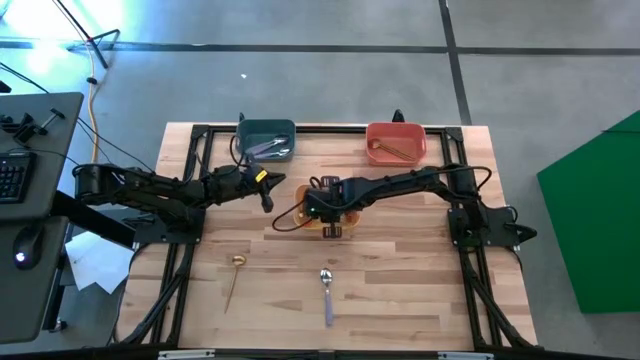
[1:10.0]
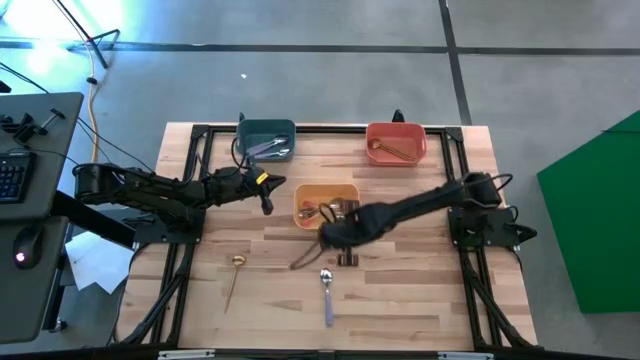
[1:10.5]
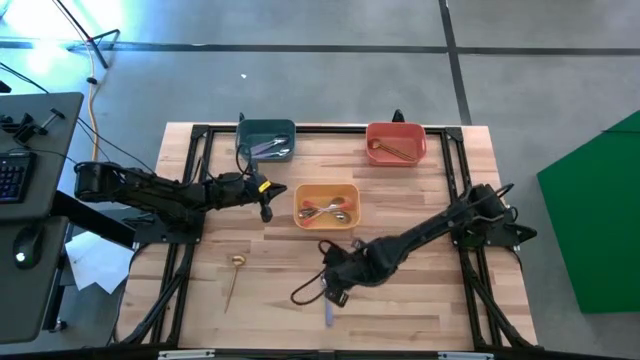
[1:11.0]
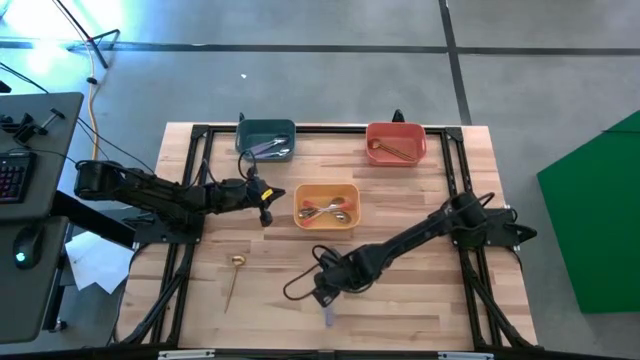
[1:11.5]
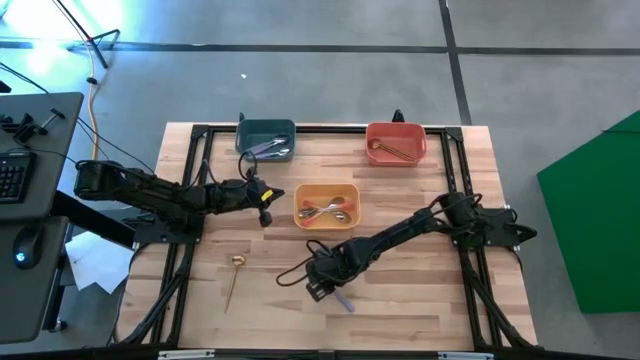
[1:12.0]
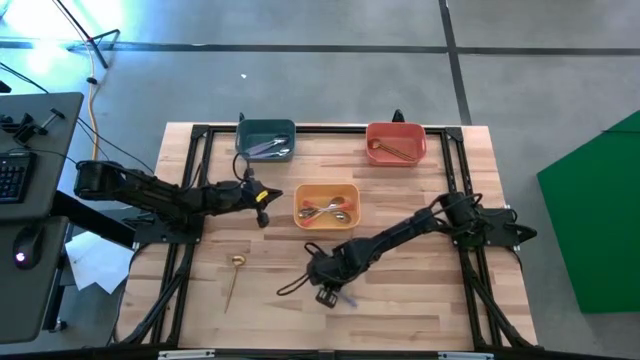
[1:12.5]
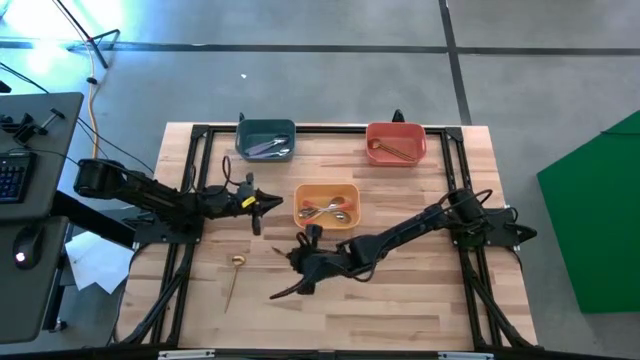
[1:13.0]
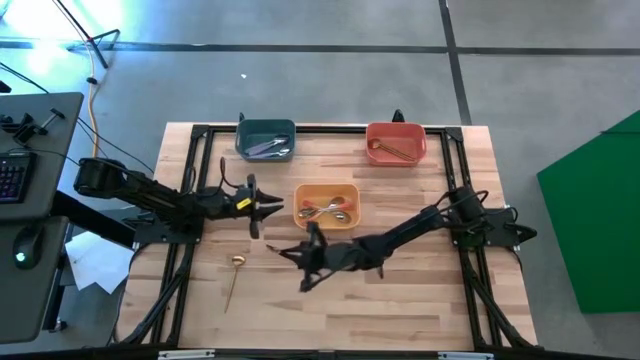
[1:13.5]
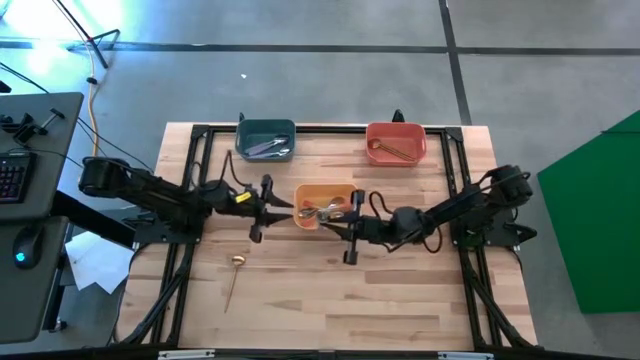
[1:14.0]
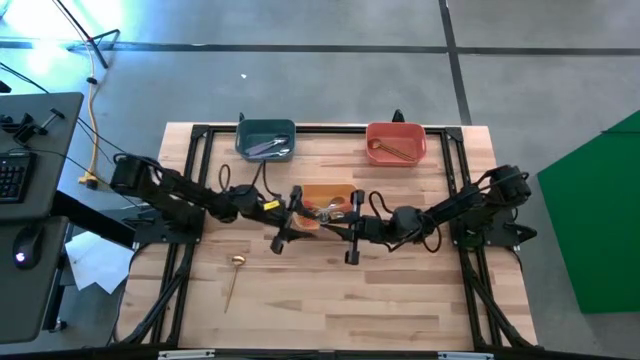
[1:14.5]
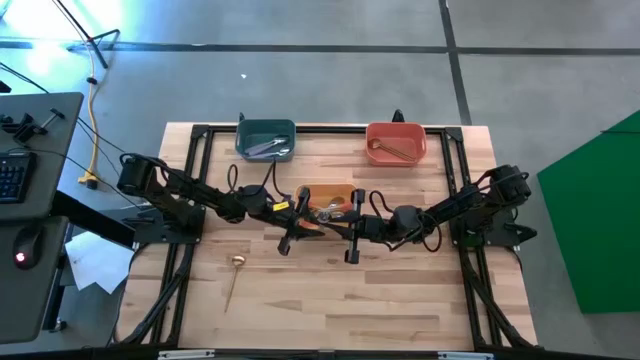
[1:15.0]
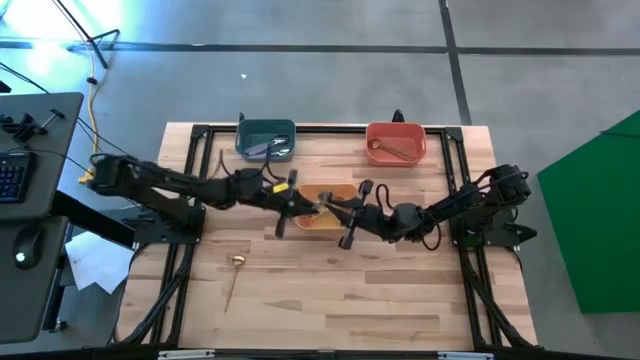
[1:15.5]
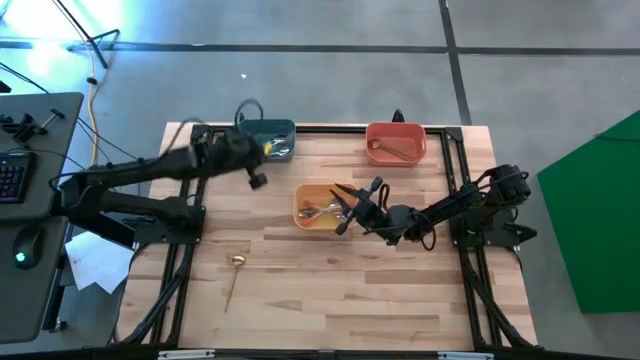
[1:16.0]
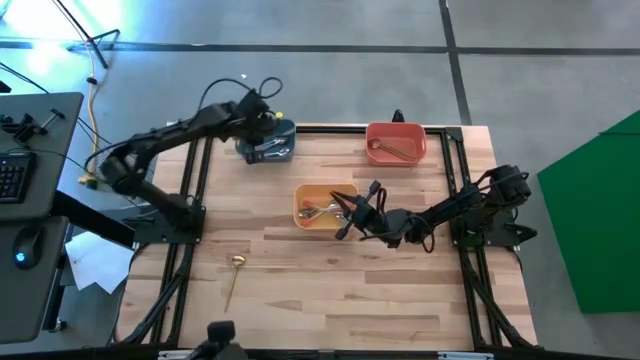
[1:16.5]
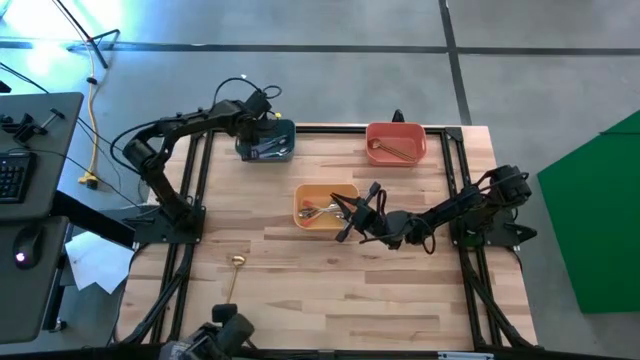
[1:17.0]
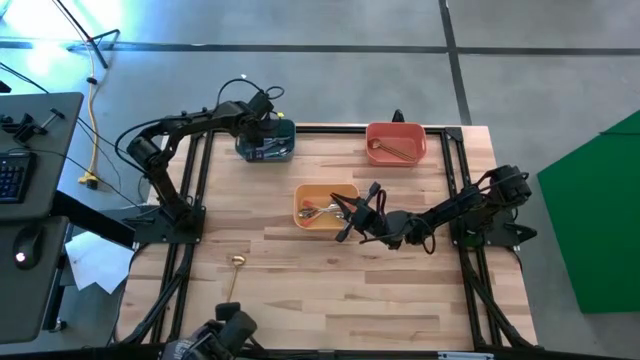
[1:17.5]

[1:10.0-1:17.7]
Task: Sort silverware by color (type)
Put the purple spoon into the blue bin

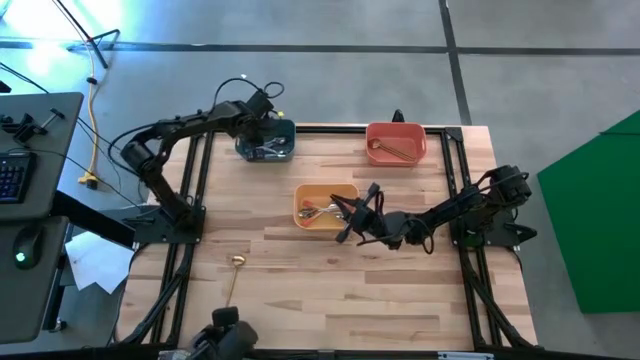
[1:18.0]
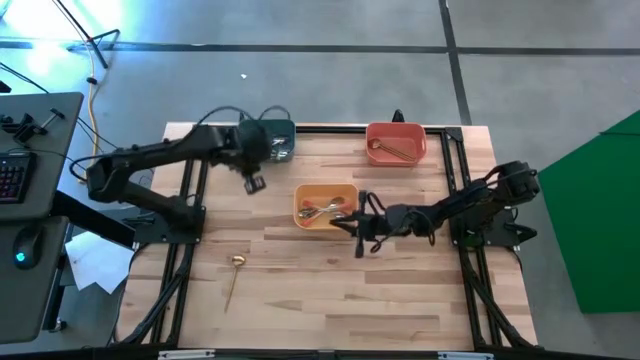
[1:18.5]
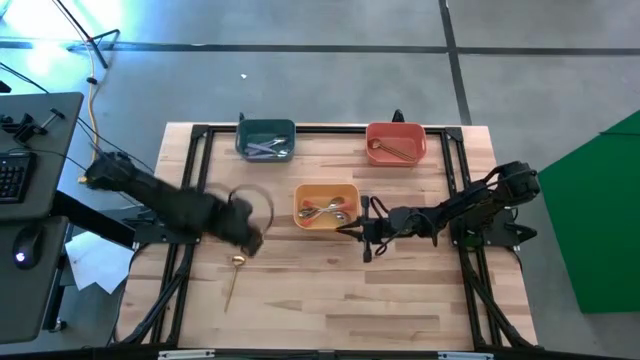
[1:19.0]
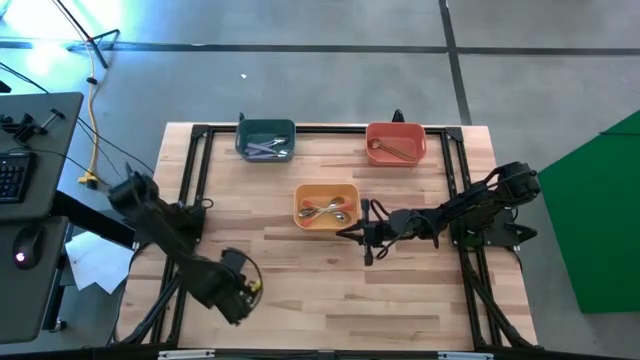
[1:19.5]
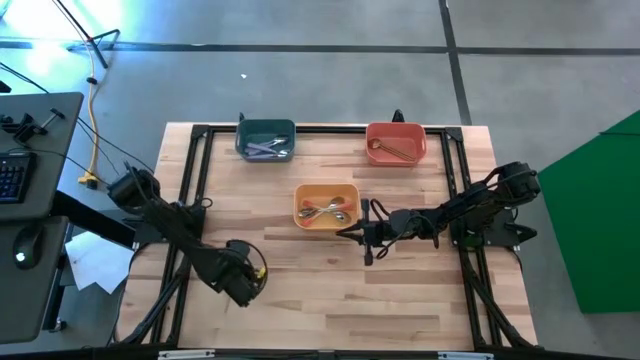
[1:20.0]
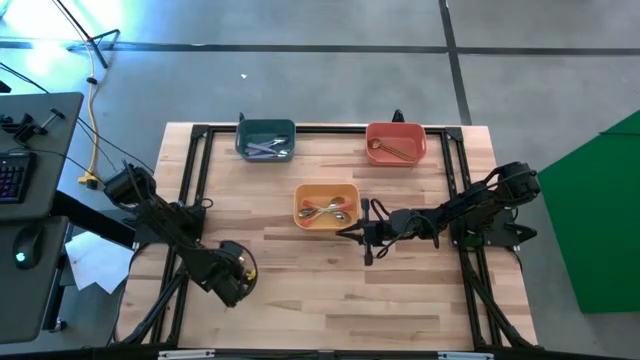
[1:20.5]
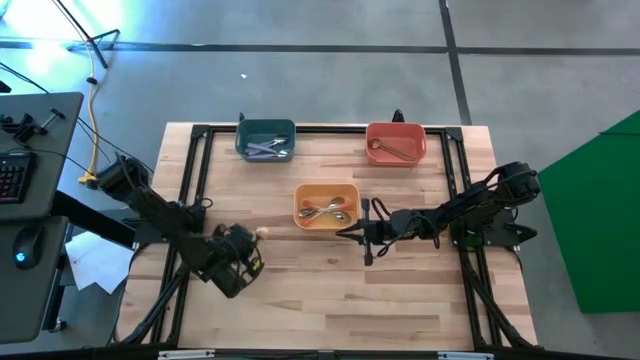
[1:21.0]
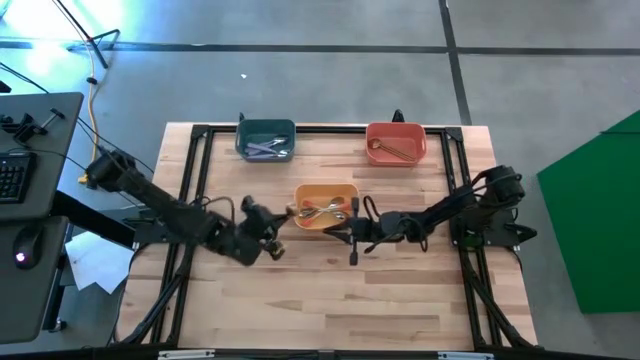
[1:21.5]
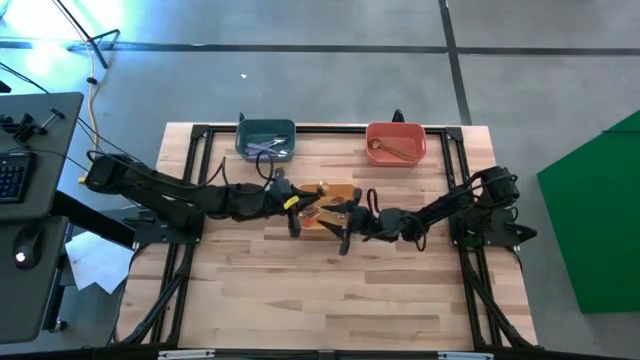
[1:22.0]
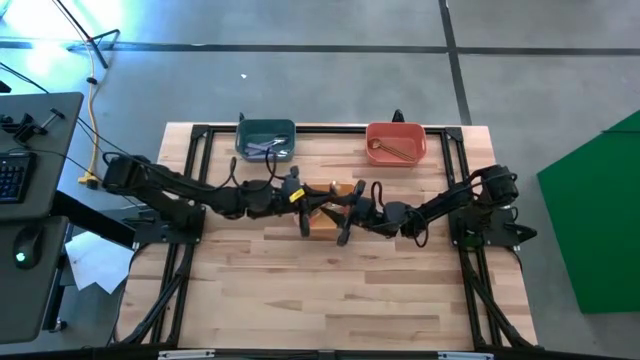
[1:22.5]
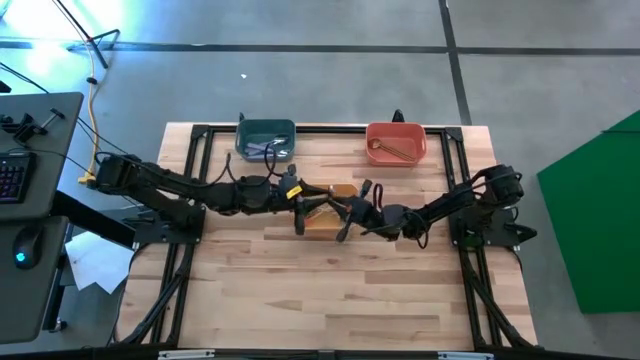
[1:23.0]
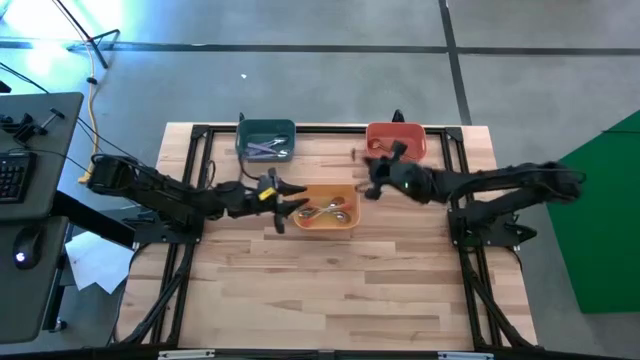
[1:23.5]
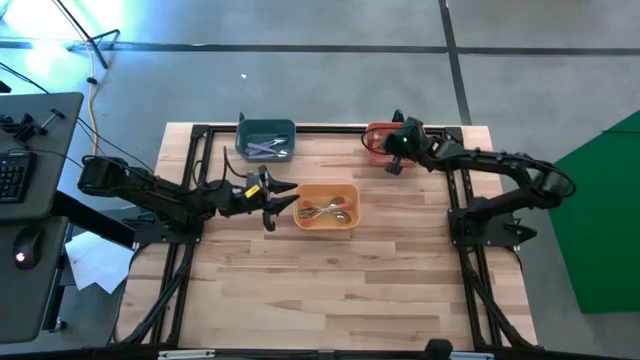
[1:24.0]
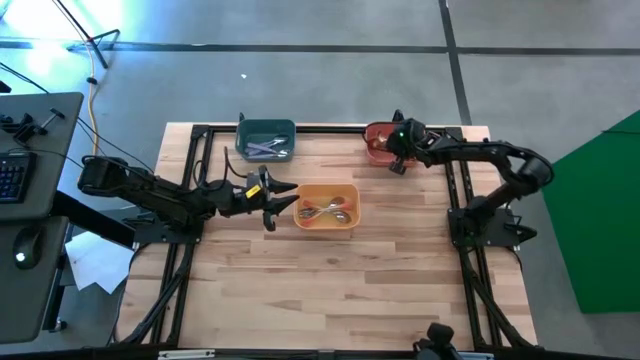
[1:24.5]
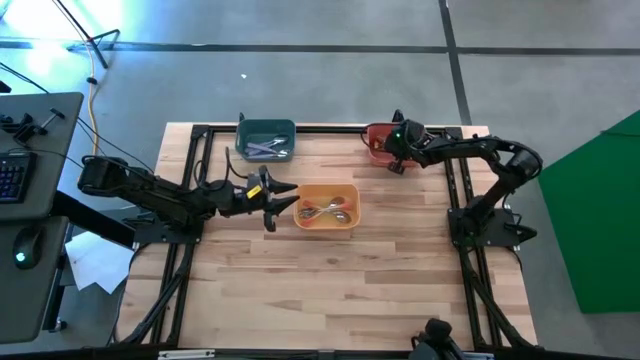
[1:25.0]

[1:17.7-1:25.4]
Put the gold spoon into the orange bin

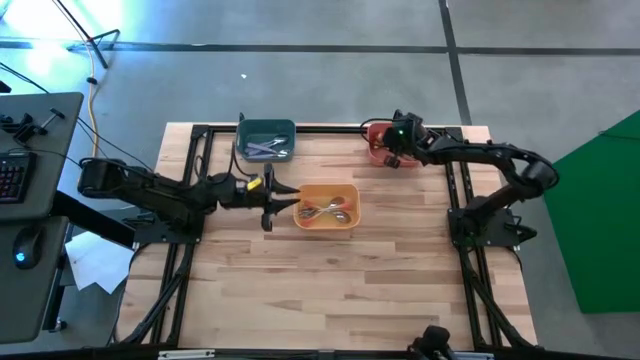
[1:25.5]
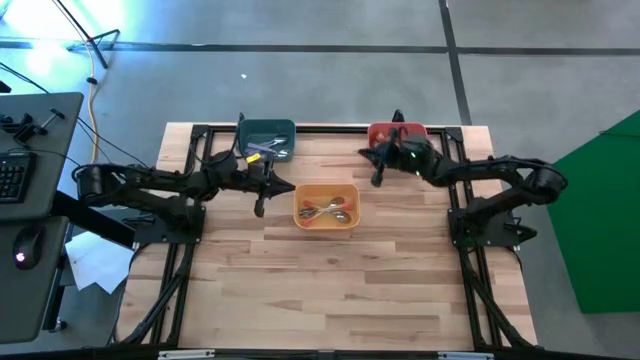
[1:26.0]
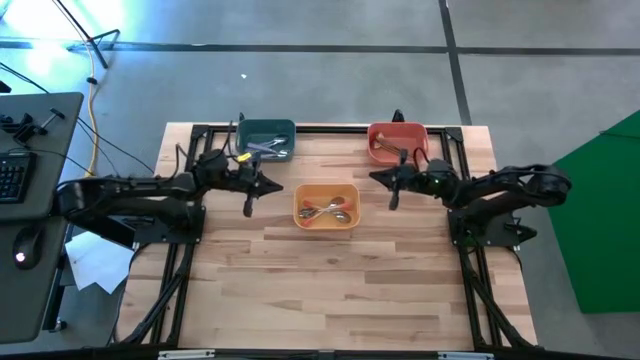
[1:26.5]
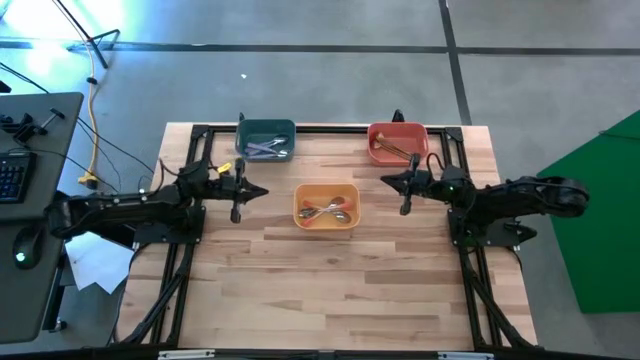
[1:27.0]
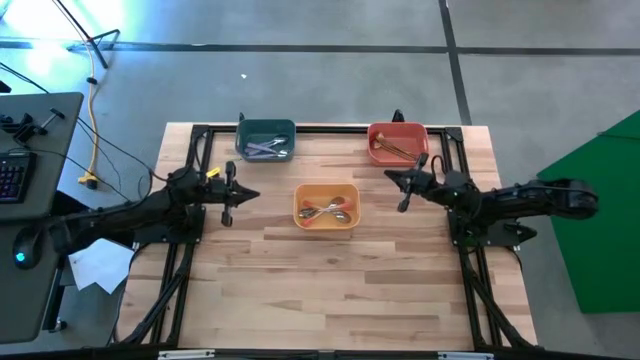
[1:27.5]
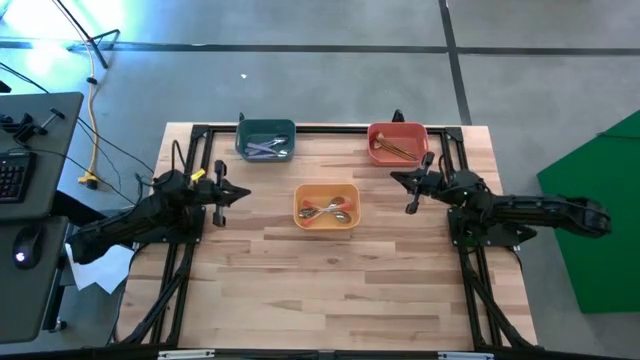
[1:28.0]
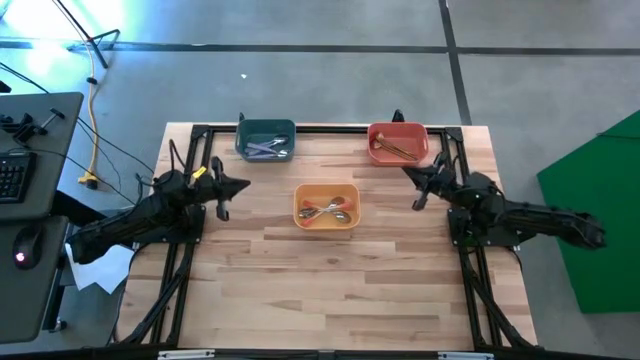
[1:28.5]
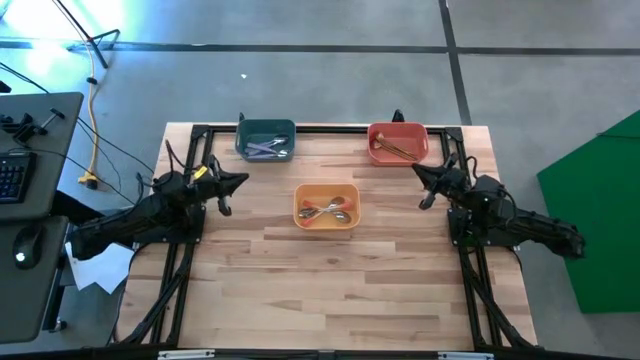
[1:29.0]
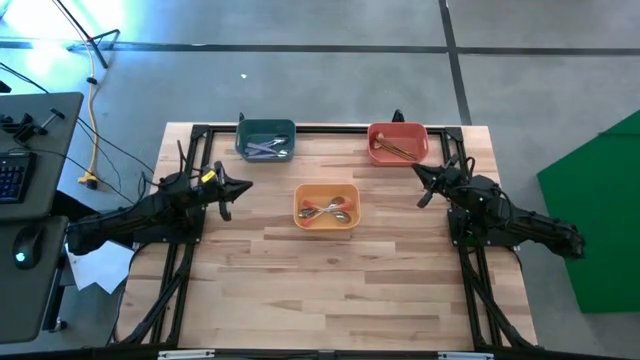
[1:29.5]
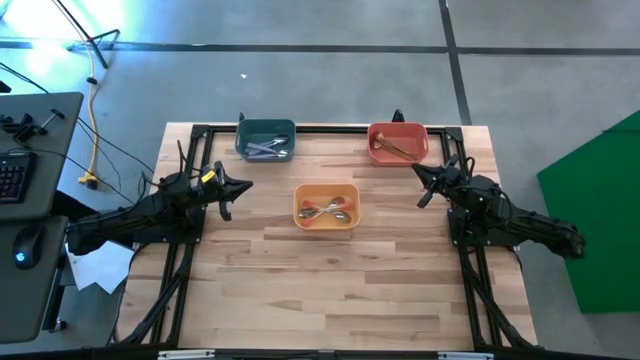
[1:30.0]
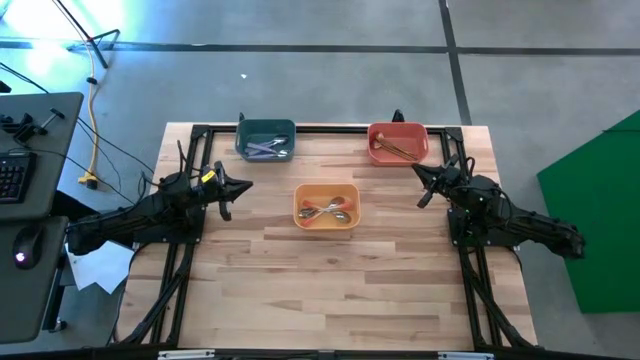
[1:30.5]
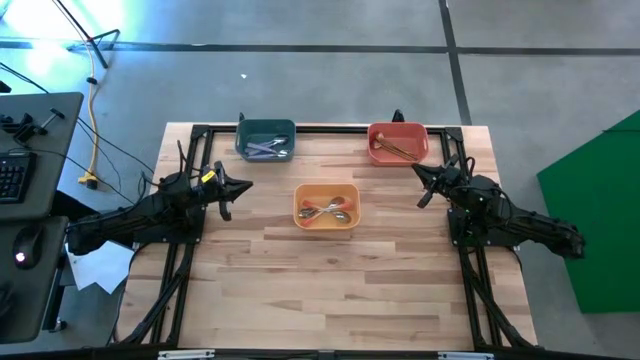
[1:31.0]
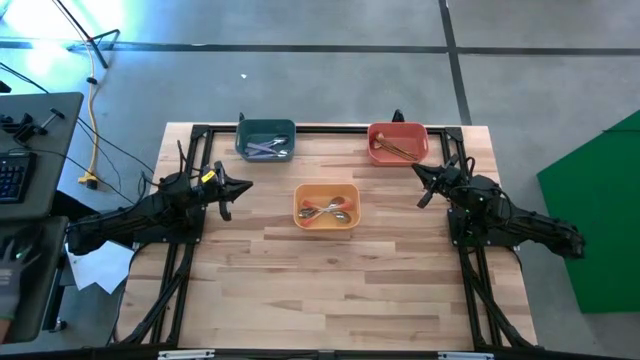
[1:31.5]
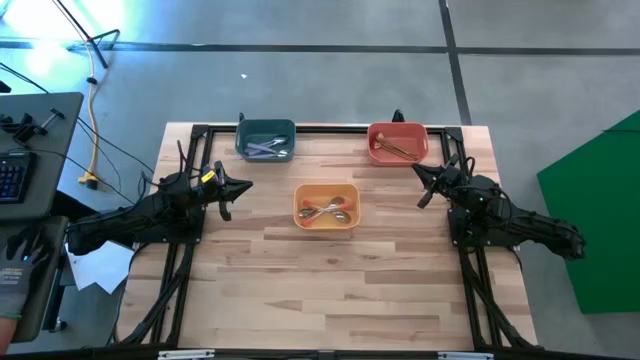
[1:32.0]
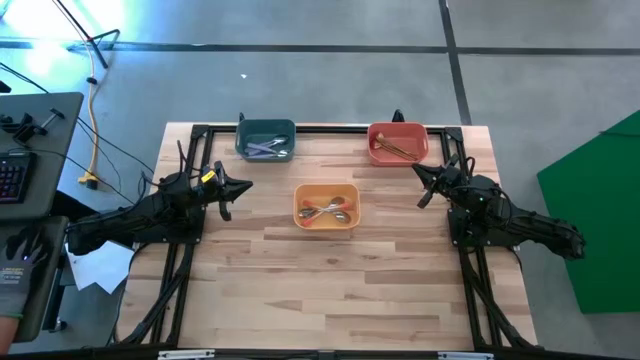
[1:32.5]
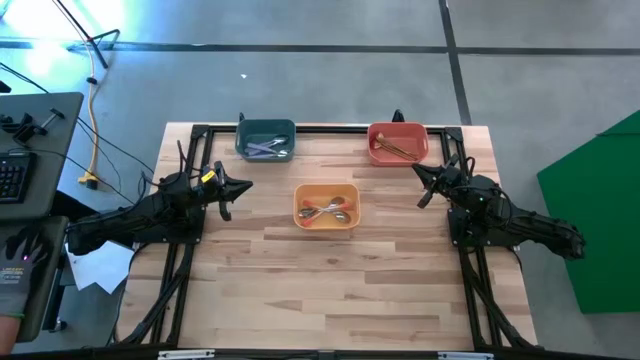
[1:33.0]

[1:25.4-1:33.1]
Return to Home Position
